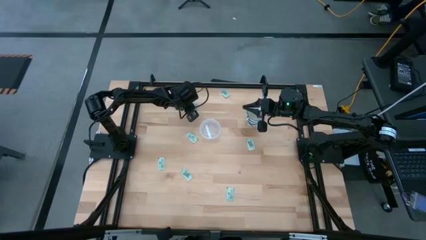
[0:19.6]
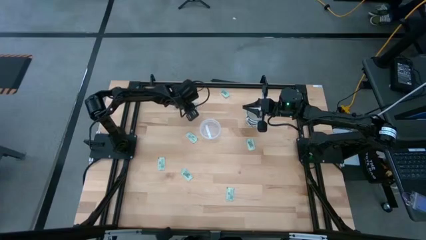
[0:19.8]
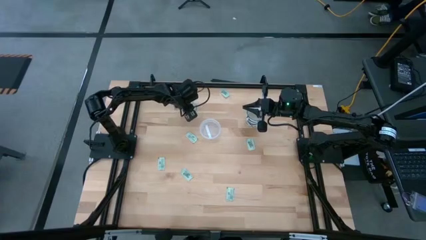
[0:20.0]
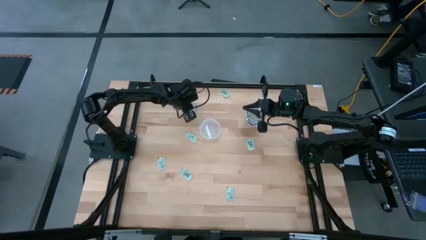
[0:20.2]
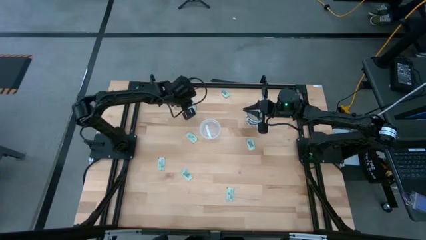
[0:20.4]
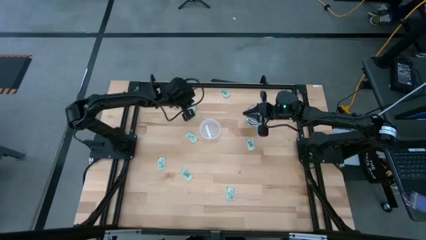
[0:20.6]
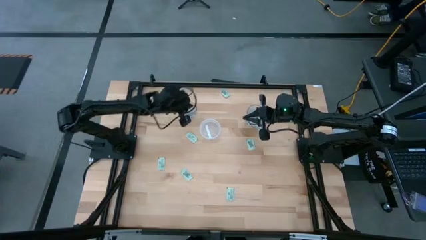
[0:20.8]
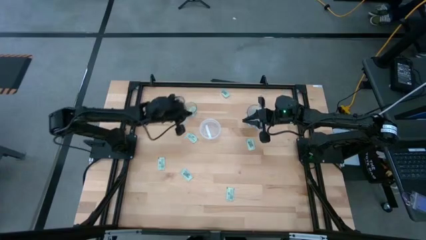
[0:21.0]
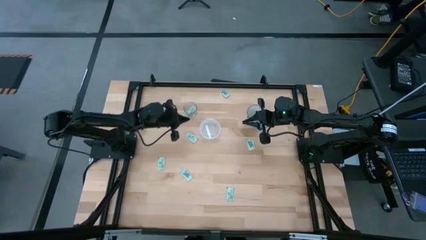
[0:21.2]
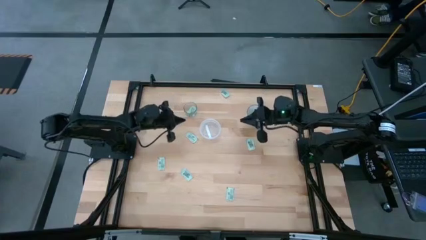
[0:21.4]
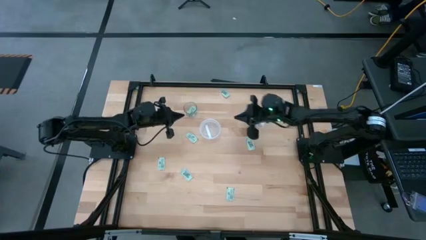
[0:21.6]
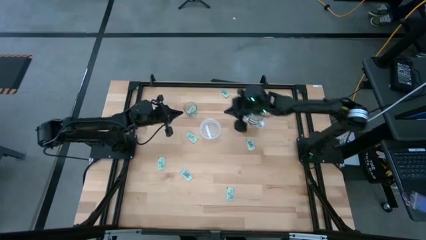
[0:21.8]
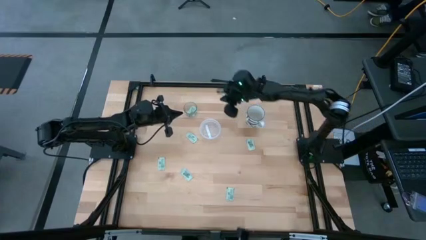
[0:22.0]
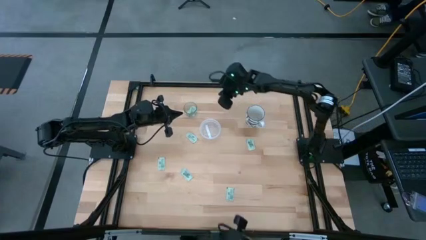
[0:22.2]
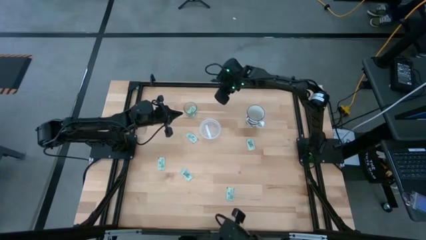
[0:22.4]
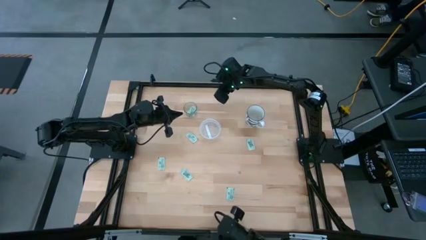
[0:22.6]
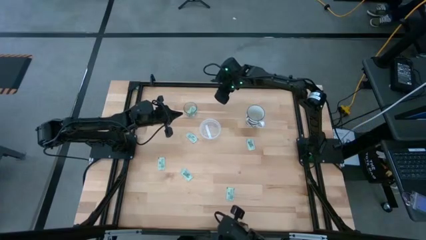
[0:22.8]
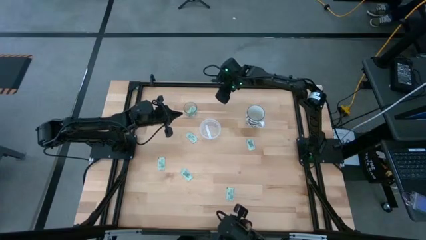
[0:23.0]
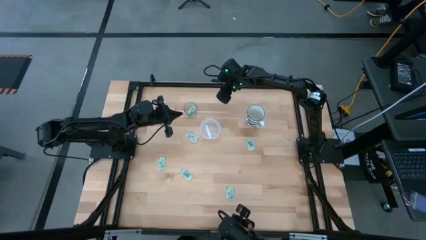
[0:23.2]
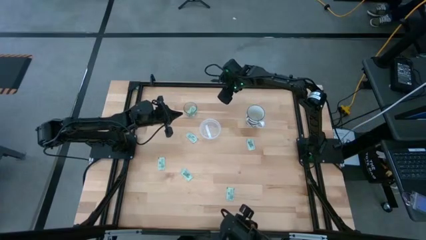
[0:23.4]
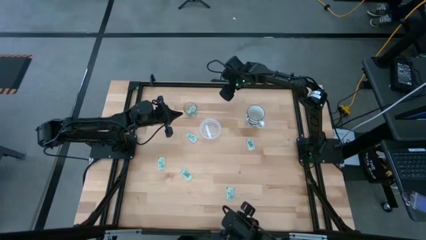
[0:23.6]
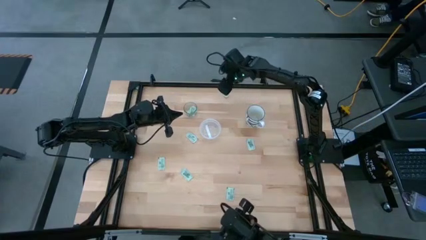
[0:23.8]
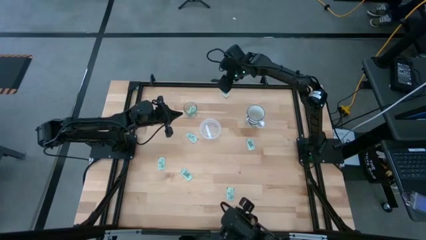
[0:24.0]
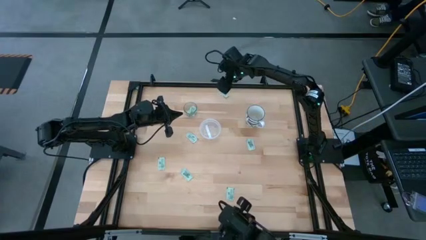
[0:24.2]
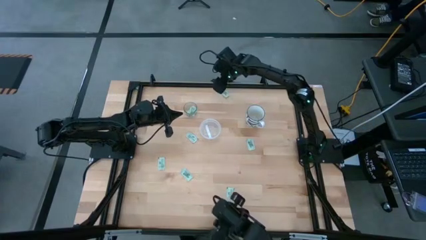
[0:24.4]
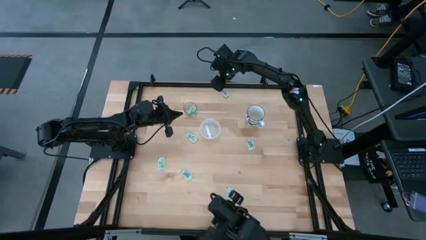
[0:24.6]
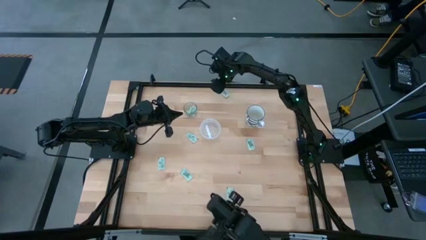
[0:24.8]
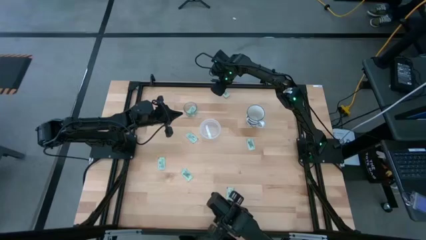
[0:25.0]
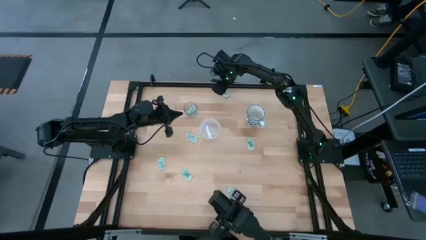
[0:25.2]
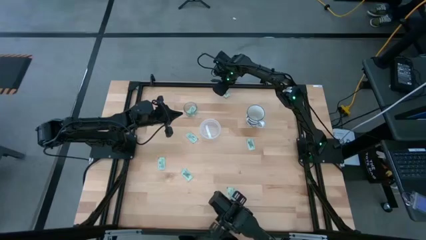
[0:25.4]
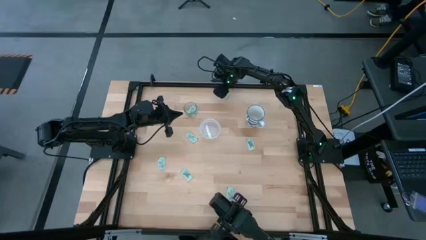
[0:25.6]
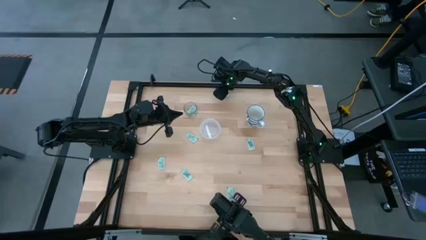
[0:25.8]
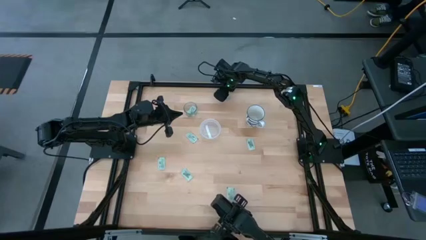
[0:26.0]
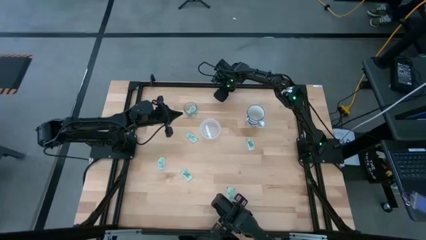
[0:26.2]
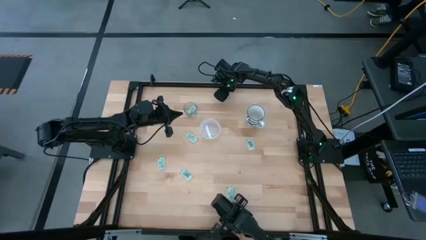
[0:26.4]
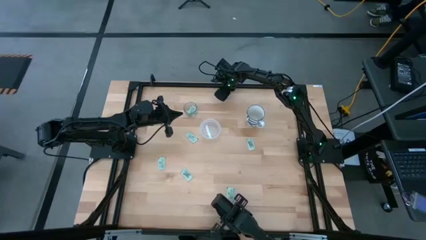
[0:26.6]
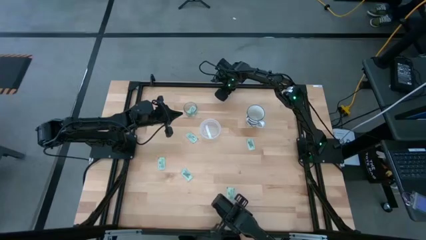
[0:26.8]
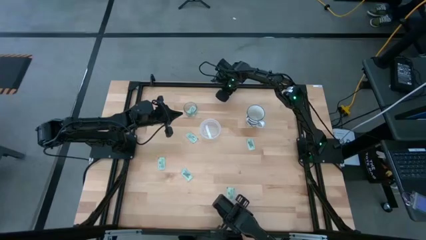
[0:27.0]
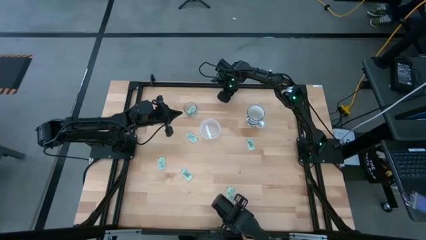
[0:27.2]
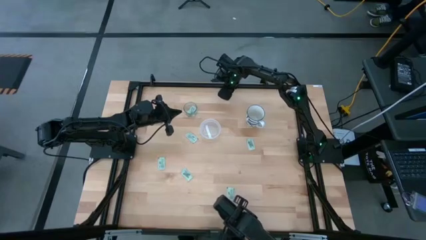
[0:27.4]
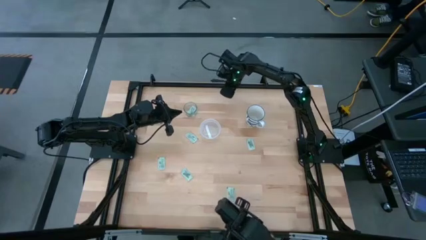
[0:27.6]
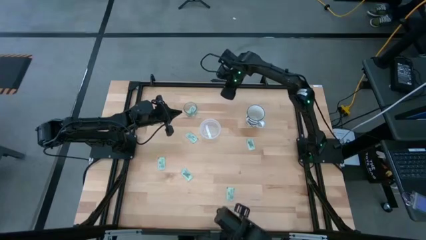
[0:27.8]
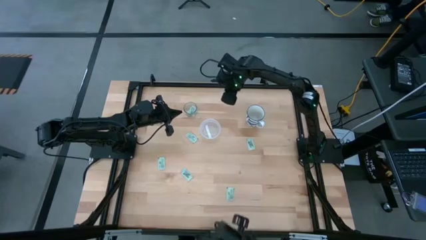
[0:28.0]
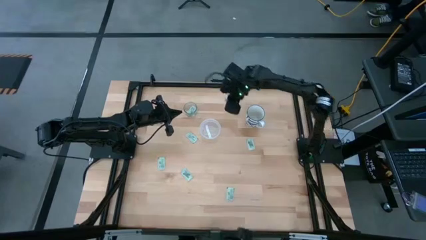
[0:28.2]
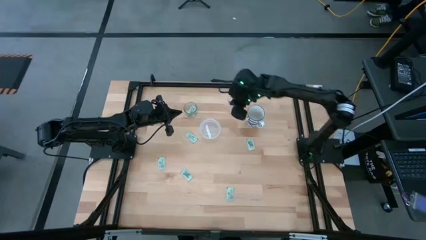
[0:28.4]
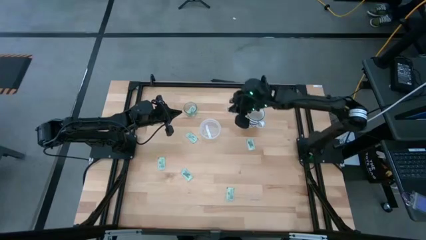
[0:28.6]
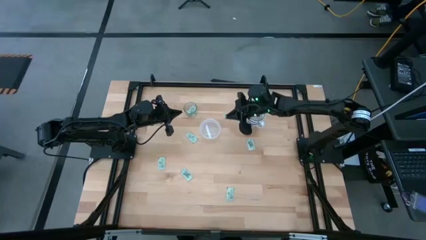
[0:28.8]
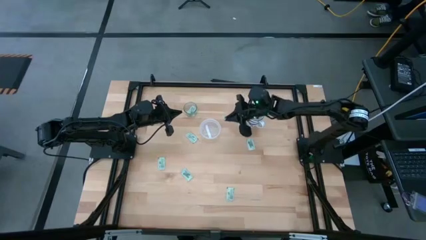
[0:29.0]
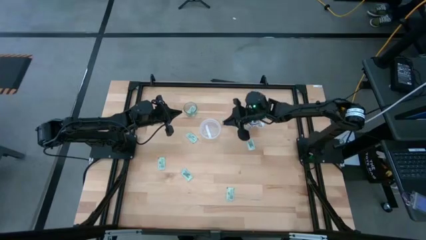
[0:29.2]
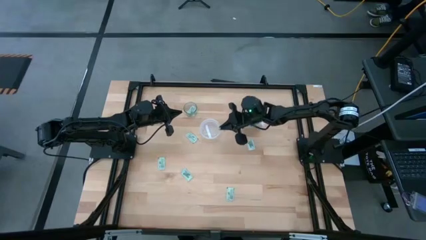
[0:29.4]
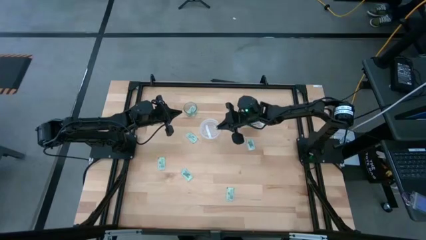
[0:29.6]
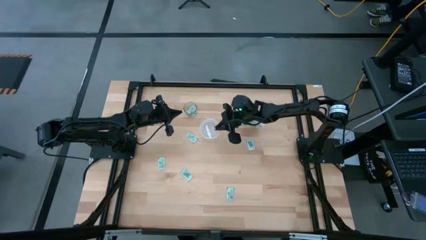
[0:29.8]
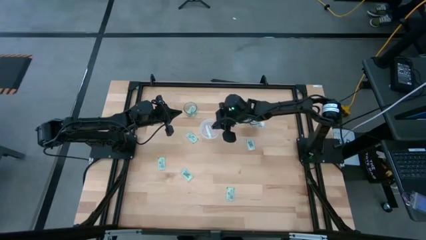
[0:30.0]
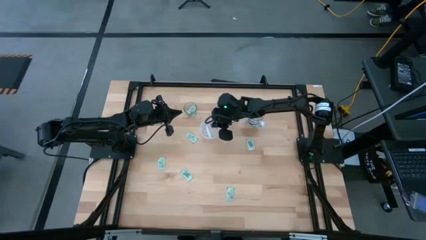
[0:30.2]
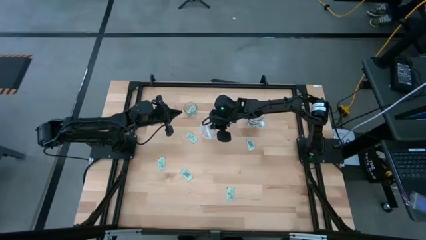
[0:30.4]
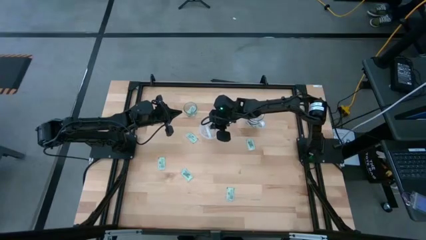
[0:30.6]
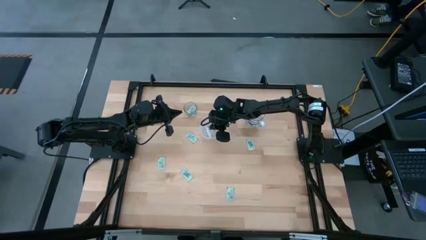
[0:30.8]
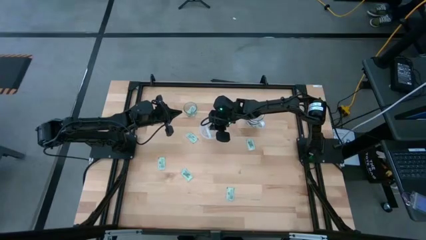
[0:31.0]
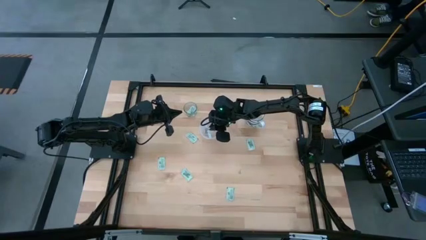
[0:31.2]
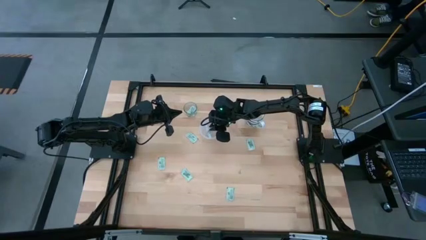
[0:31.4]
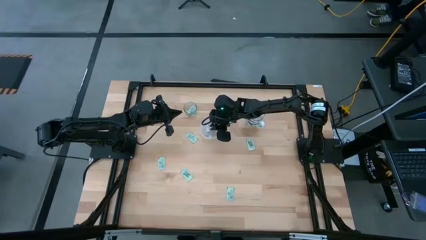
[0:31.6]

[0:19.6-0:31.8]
Task: Pick and place Stevia / Truvia into bins
Put the stevia packet into the transparent container
